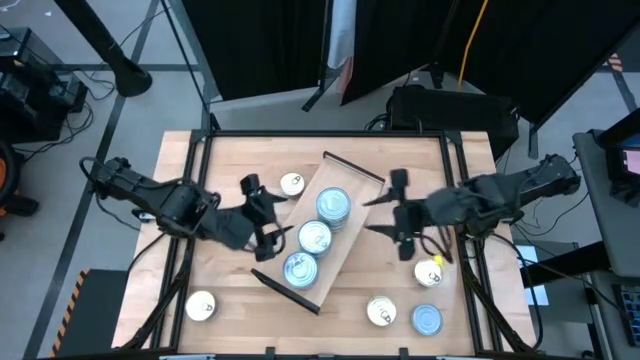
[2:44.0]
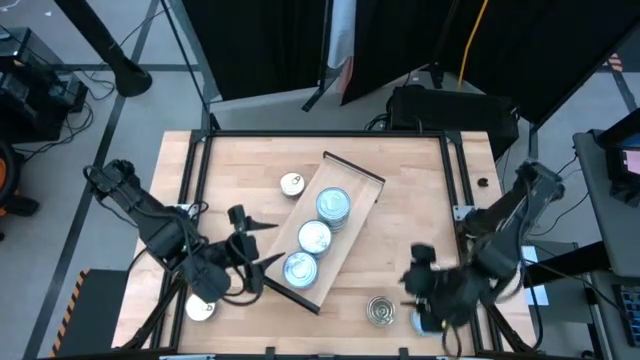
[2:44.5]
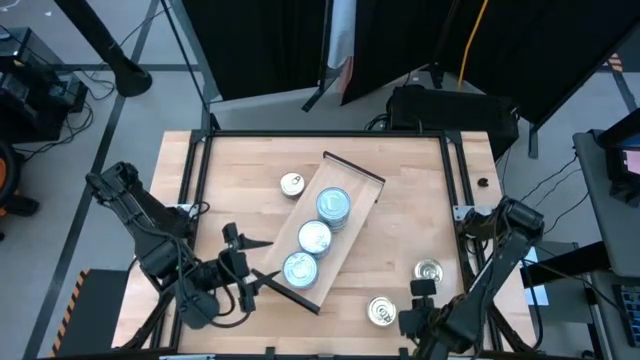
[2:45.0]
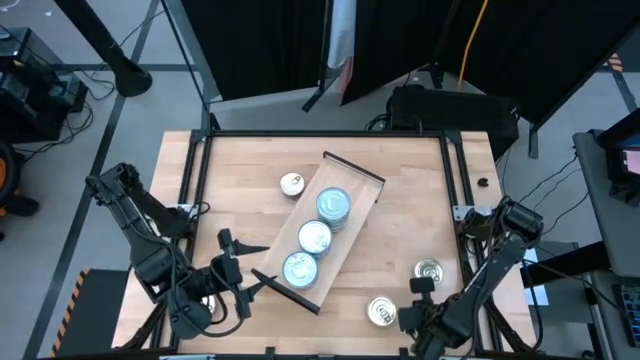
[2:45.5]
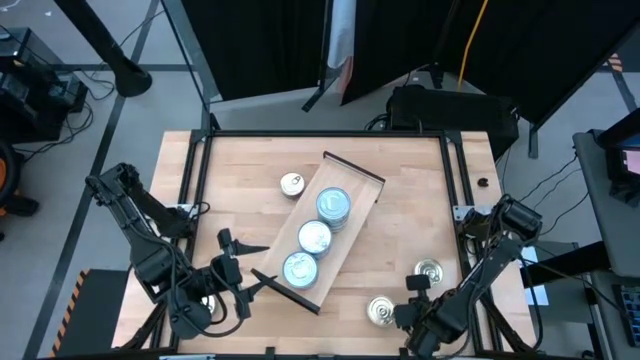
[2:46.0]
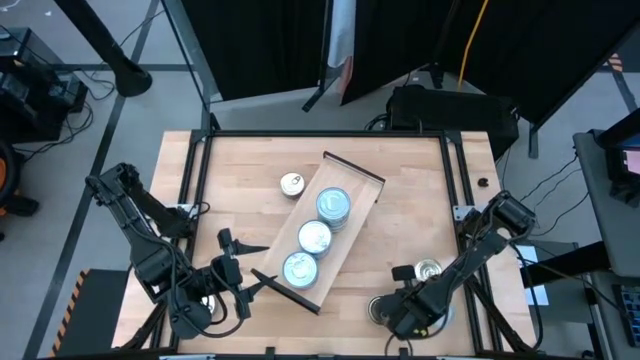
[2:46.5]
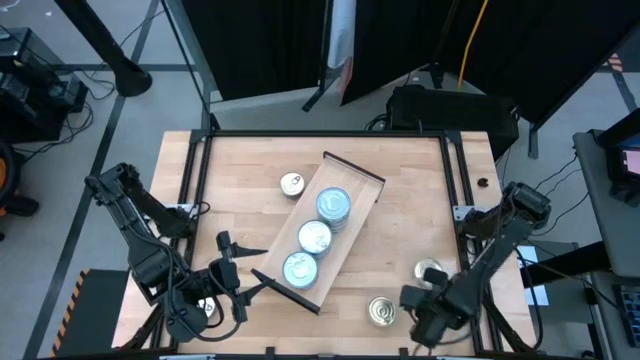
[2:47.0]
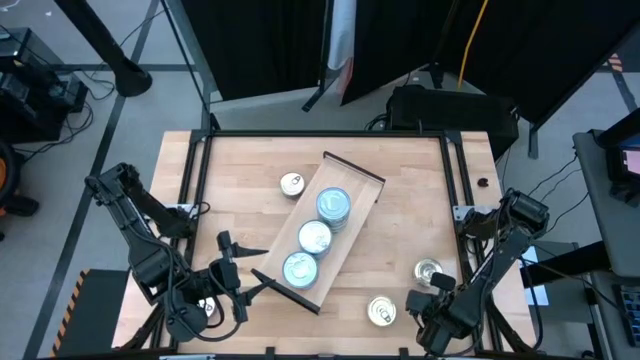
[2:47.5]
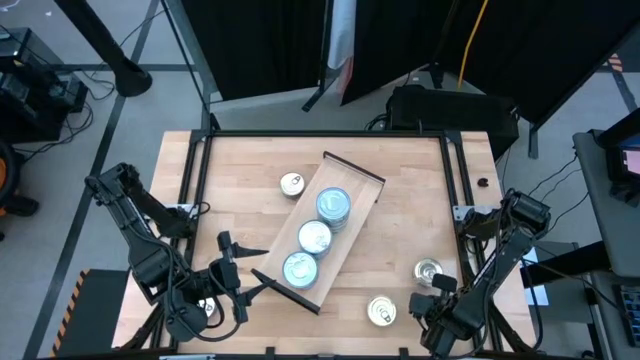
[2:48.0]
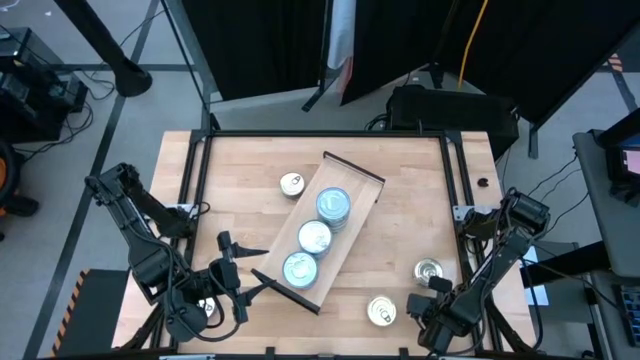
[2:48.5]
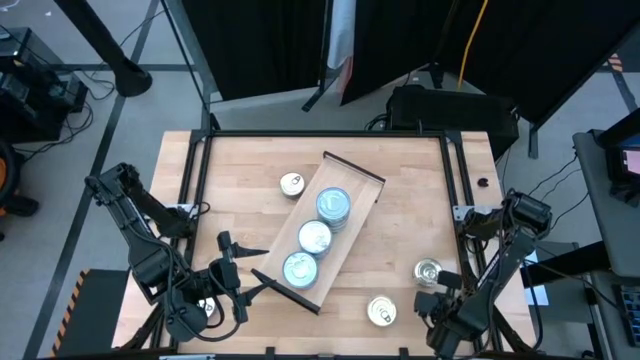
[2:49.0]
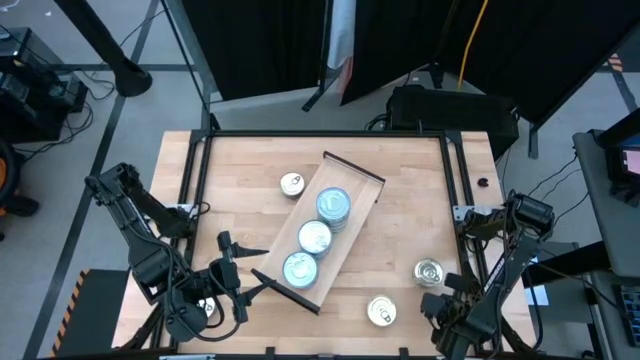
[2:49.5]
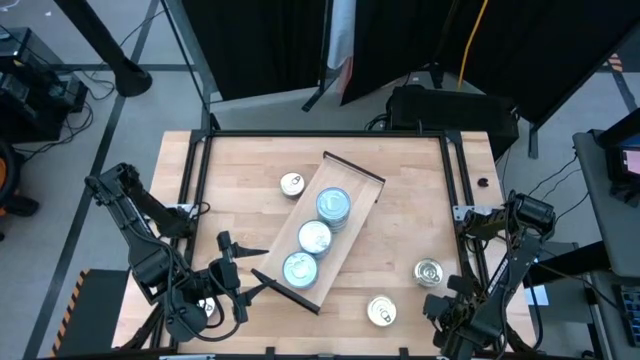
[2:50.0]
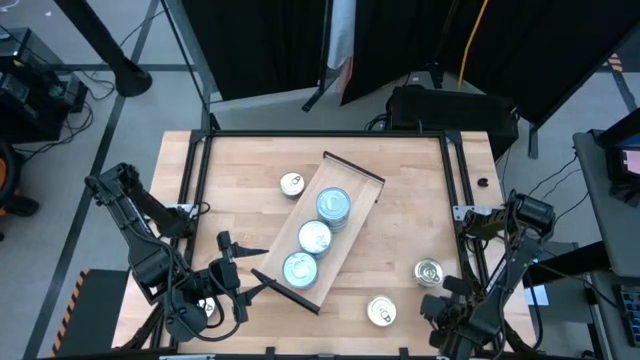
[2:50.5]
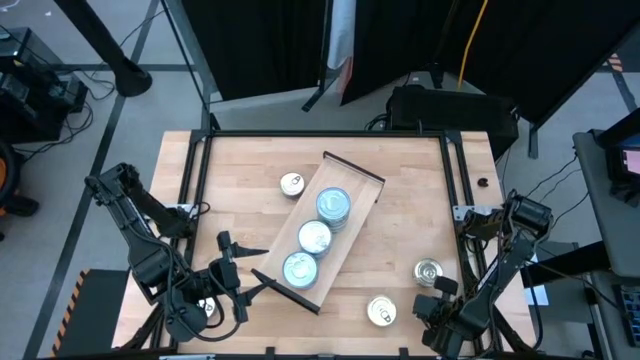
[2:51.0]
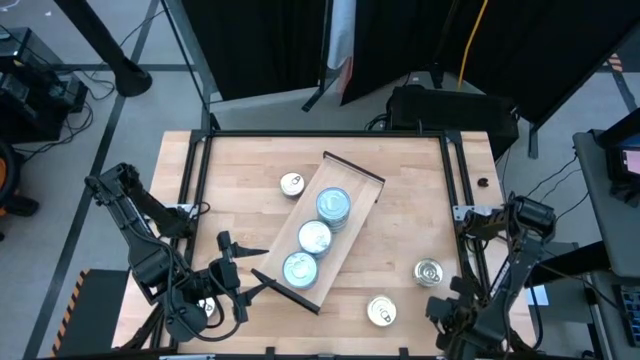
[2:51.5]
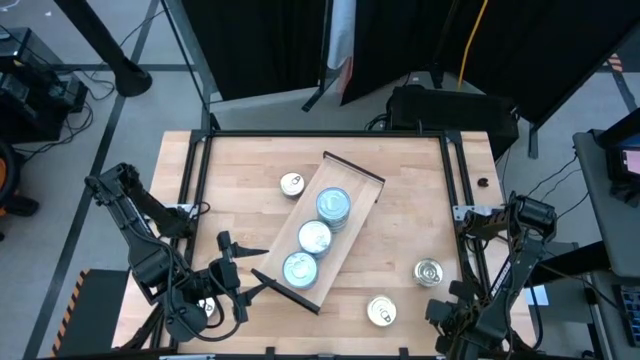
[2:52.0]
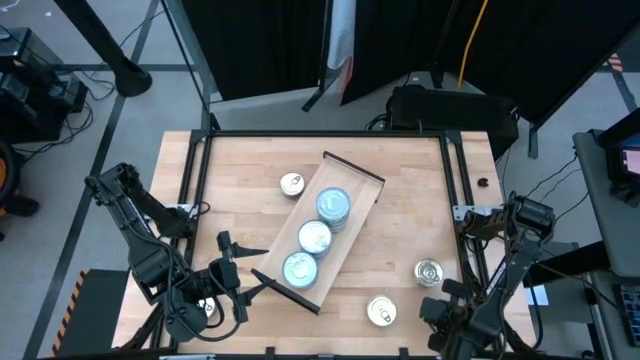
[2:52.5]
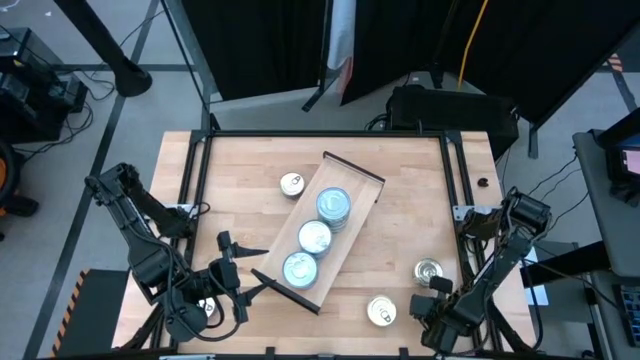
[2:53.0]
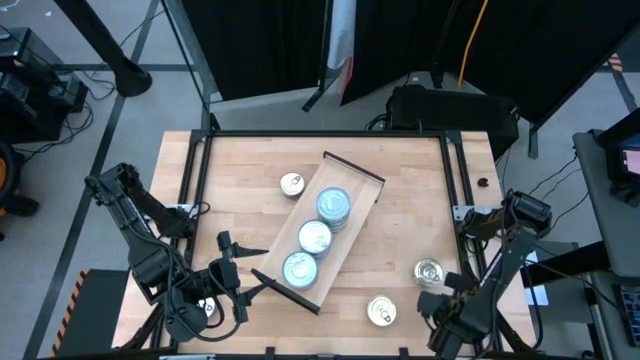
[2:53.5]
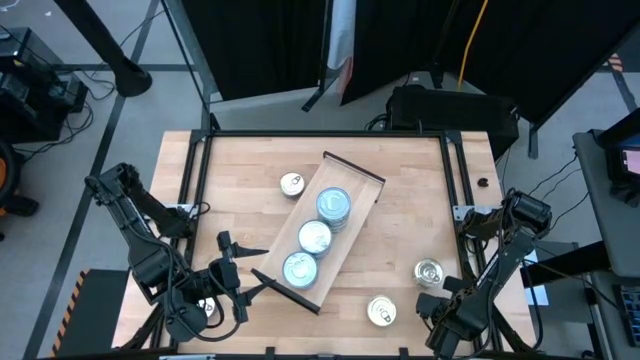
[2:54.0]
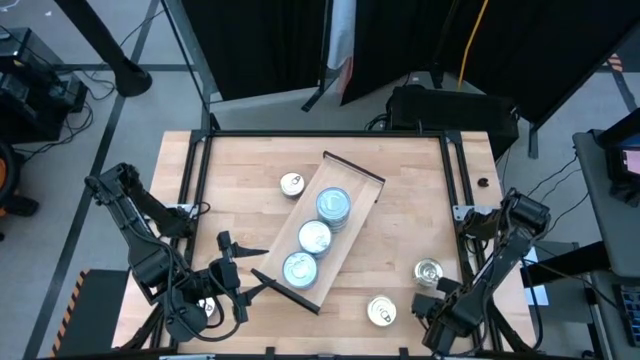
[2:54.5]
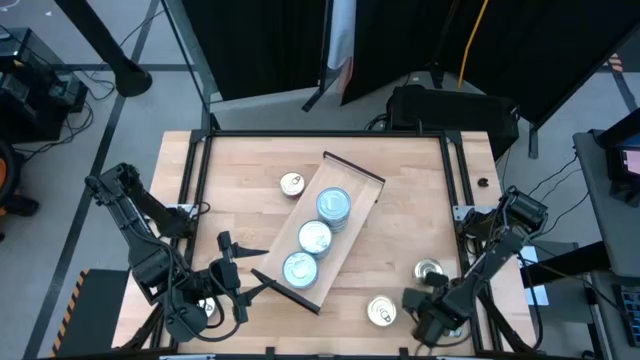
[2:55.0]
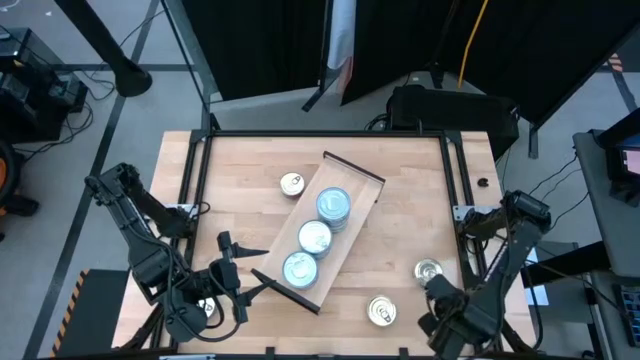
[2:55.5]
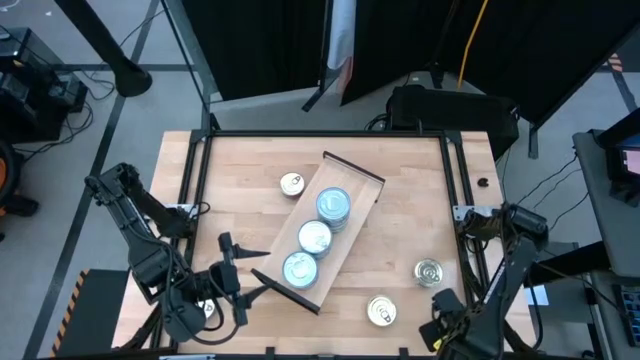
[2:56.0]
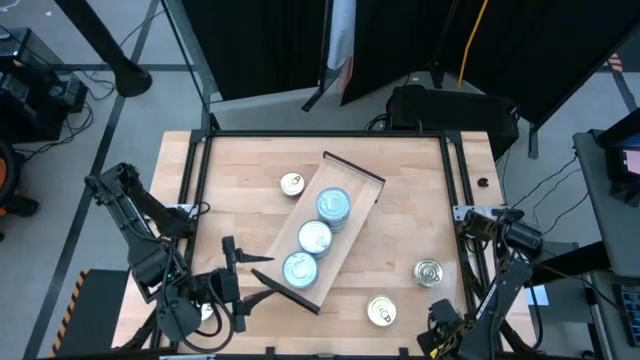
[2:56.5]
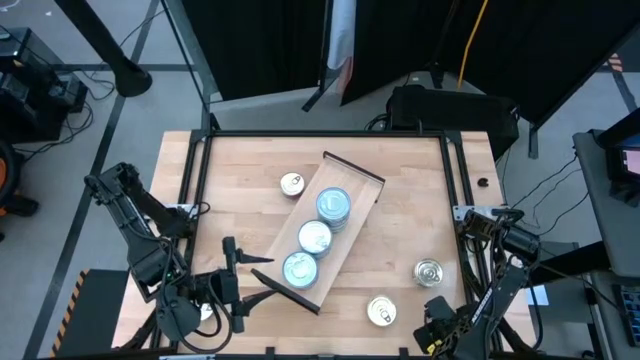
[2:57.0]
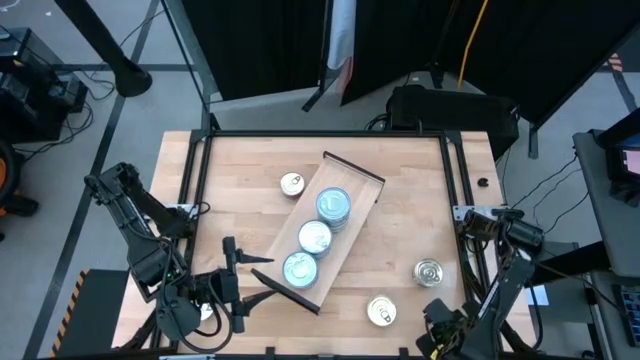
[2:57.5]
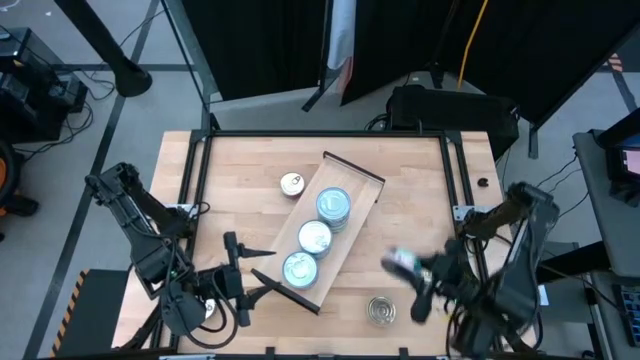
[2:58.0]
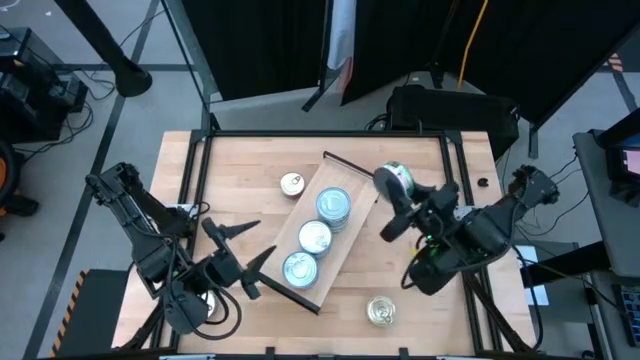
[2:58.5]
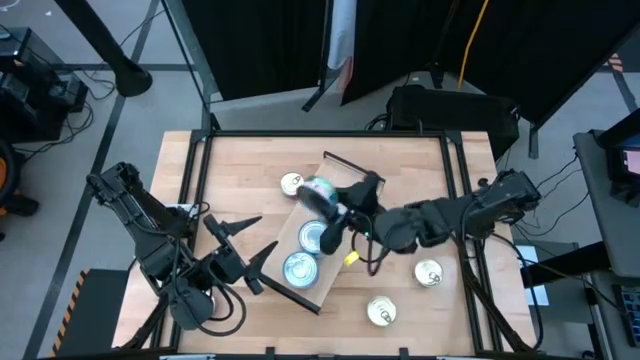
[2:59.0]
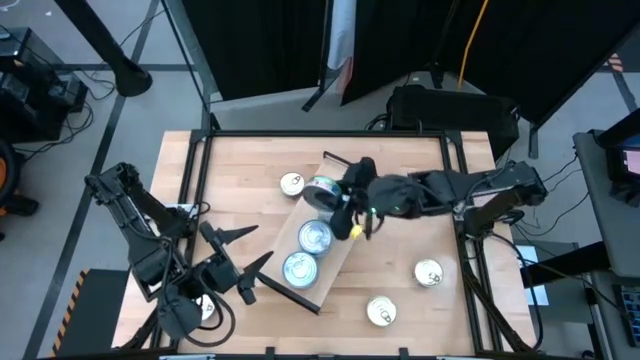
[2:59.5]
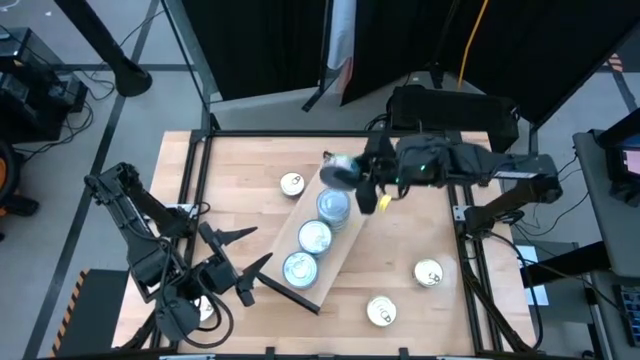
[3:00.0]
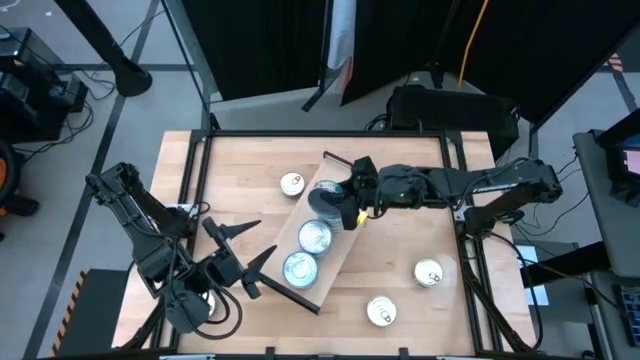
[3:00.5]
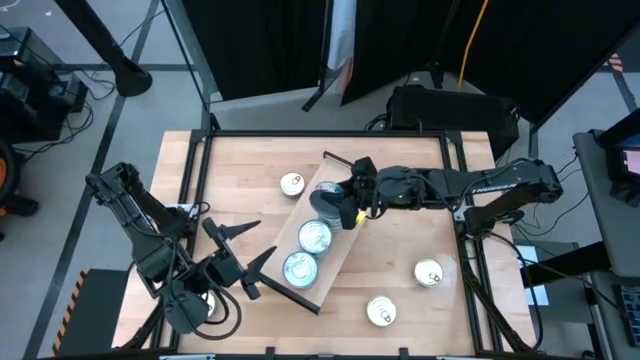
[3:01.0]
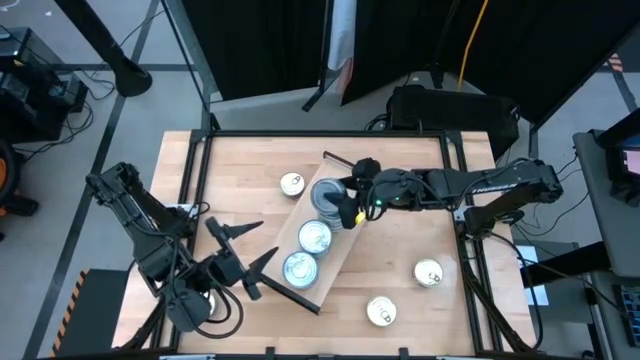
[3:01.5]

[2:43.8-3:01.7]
Task: Stack canned seafood by type on shelf
Stack the green tuna can on top of the other green tuna can

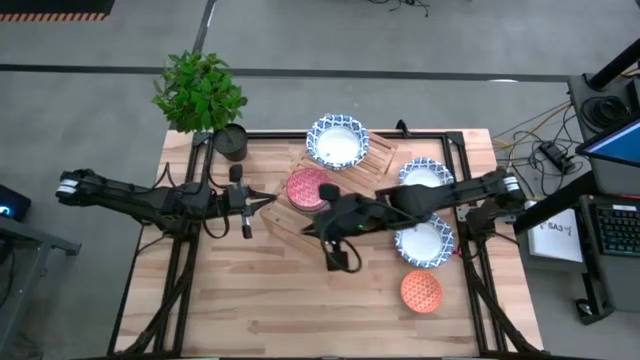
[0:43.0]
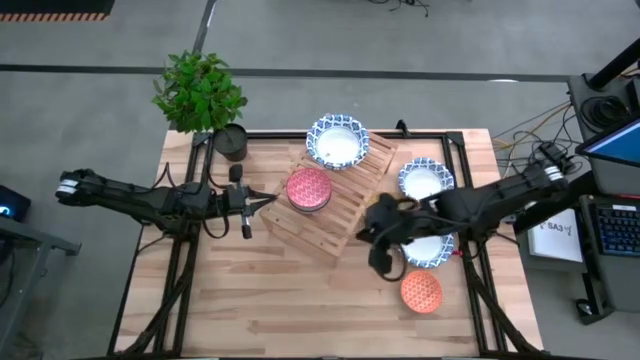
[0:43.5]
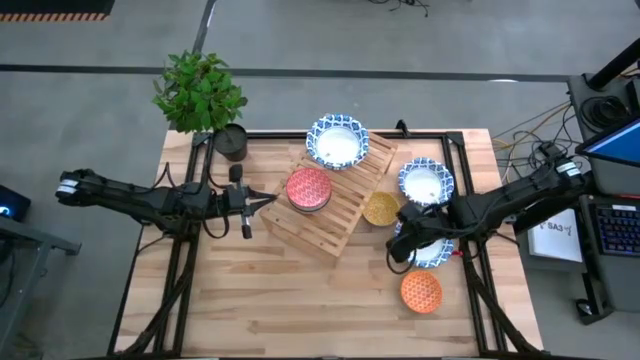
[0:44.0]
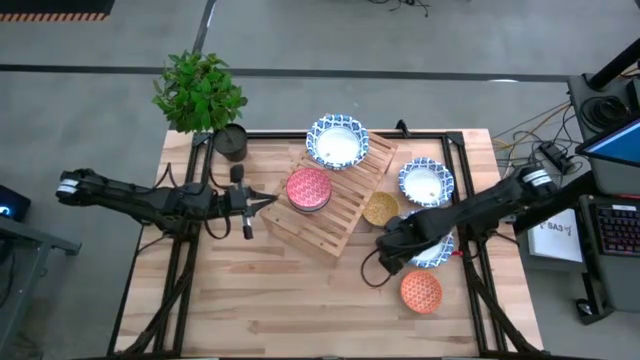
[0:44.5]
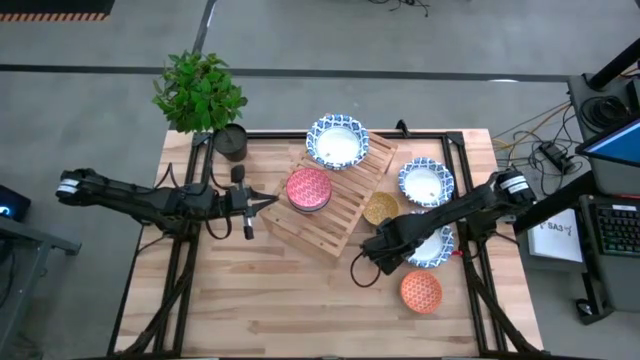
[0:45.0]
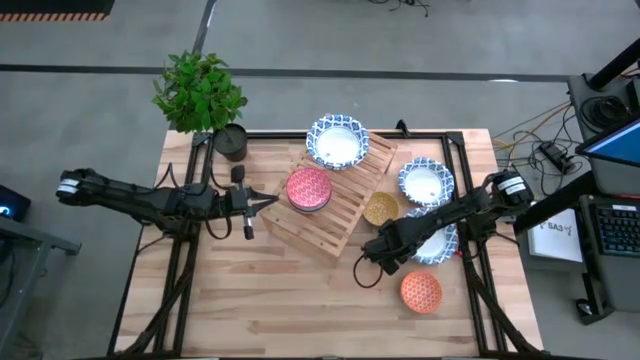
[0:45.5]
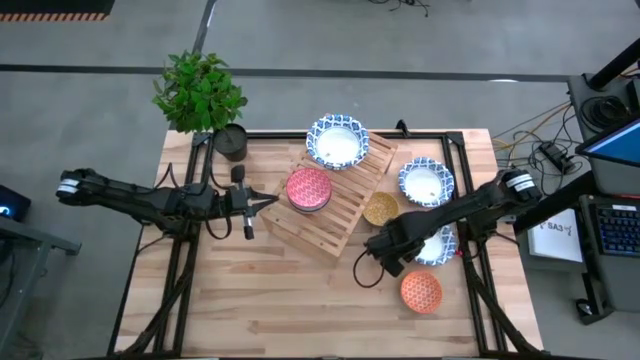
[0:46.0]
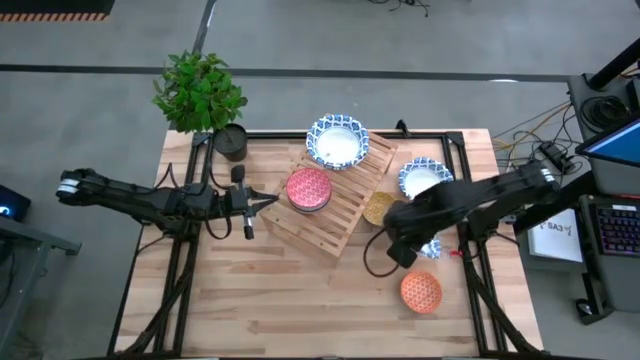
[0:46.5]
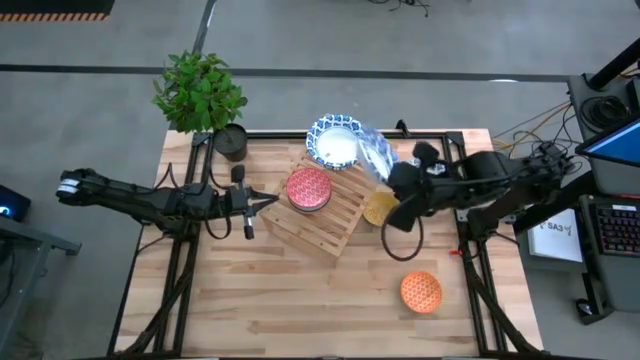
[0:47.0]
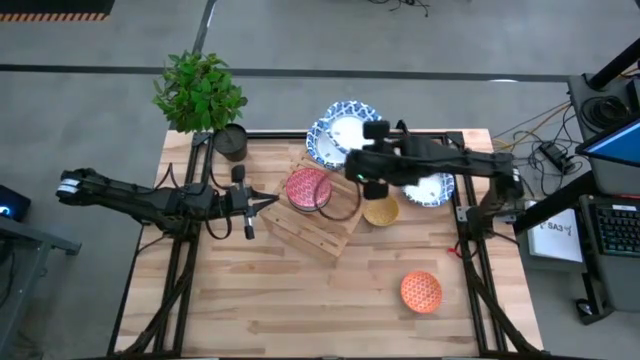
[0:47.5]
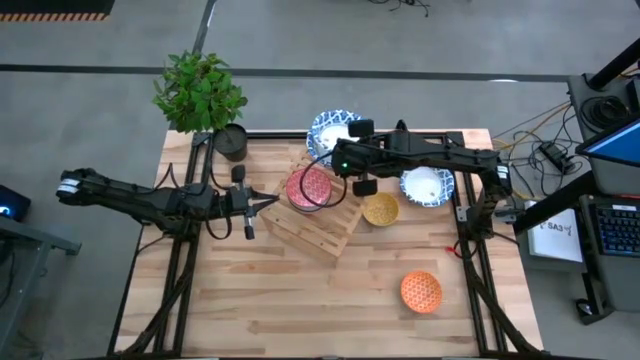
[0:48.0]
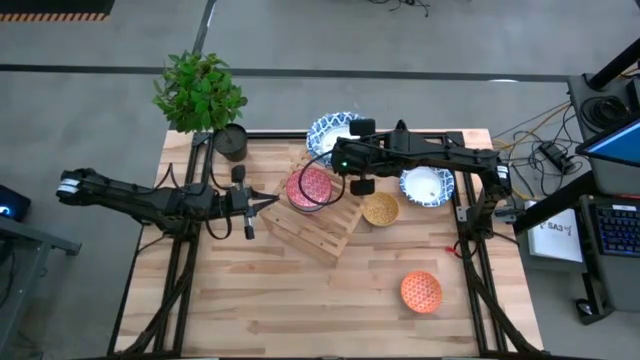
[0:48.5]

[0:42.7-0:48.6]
Task: Place and stack bowls onto a shelf
Stack the white patterned bowl on top of the white patterned bowl on the shelf
